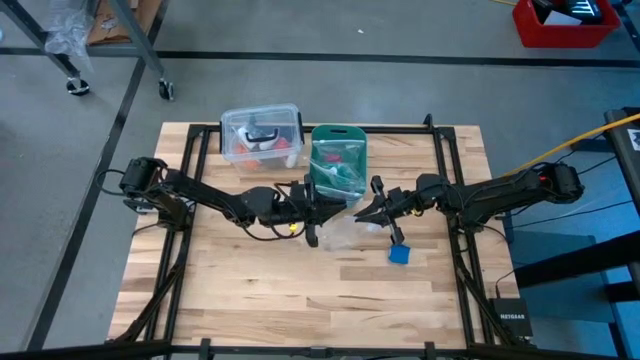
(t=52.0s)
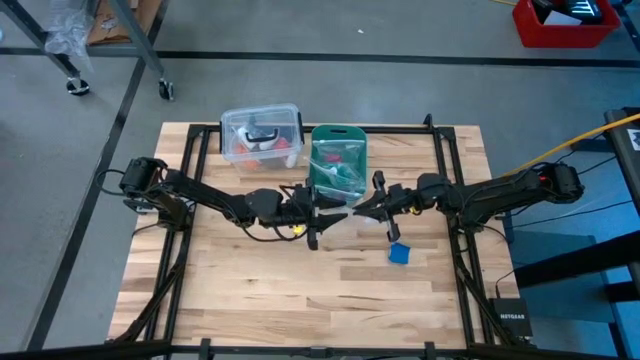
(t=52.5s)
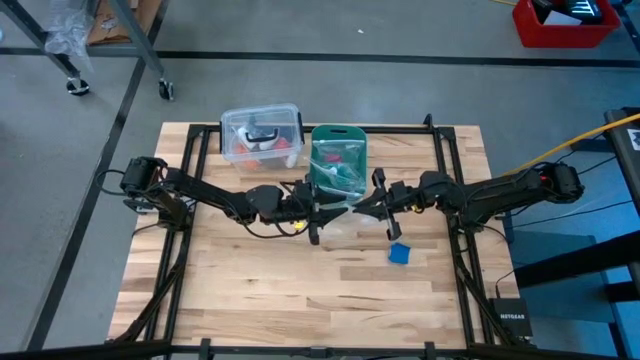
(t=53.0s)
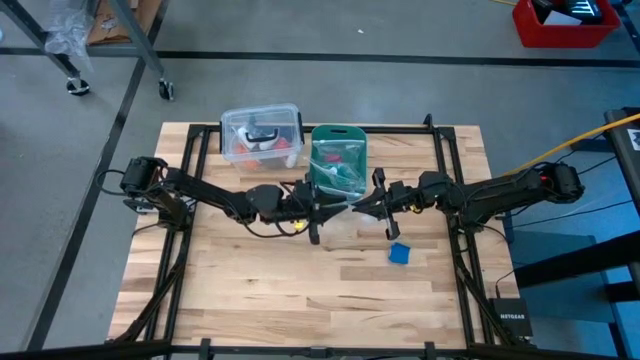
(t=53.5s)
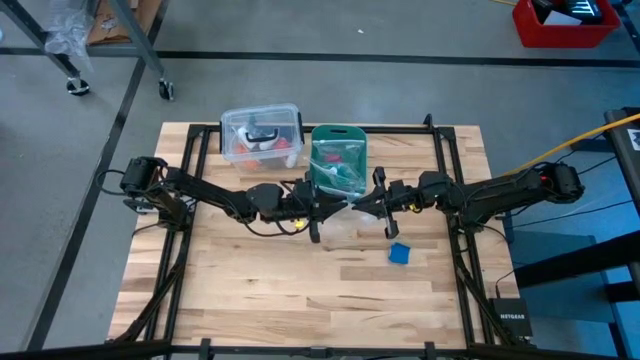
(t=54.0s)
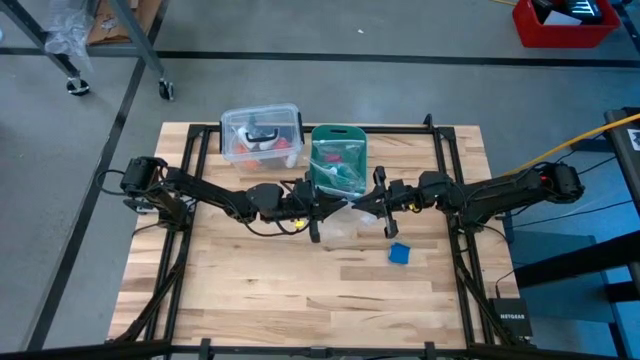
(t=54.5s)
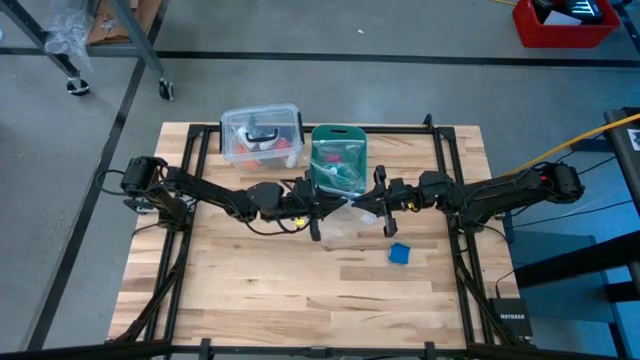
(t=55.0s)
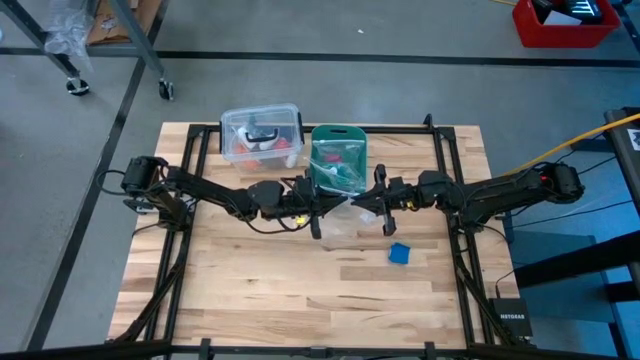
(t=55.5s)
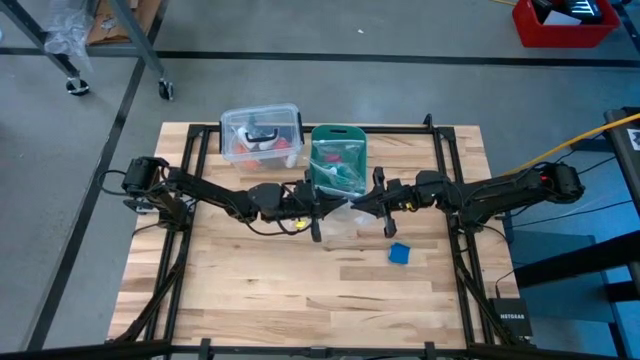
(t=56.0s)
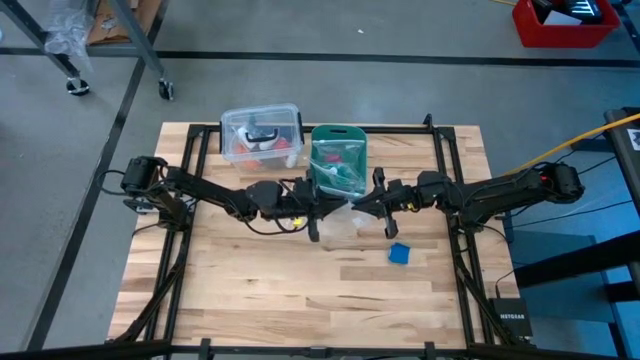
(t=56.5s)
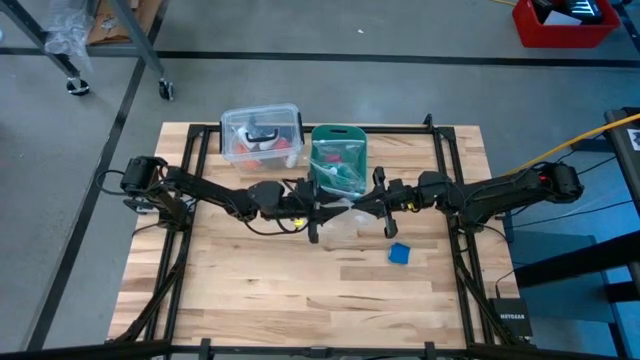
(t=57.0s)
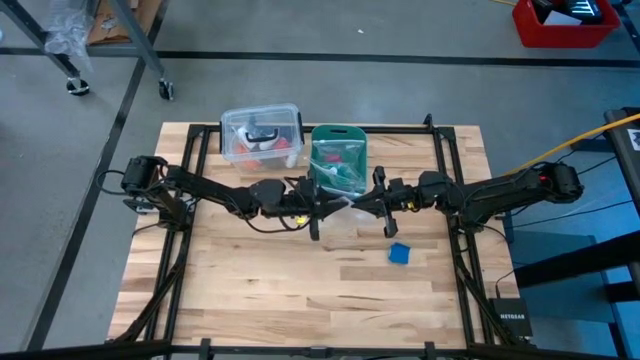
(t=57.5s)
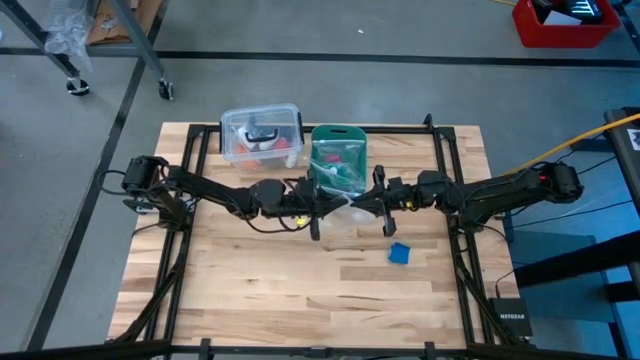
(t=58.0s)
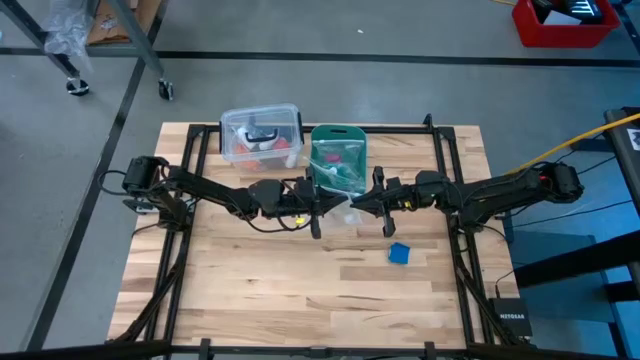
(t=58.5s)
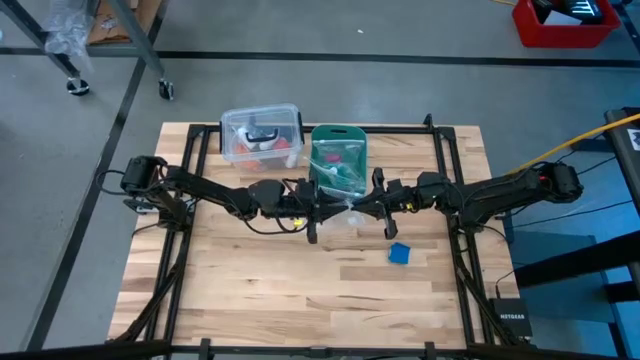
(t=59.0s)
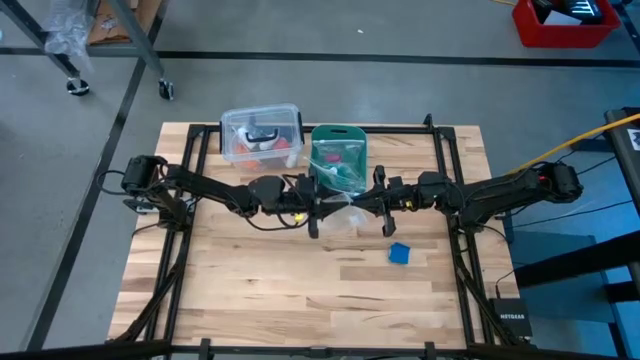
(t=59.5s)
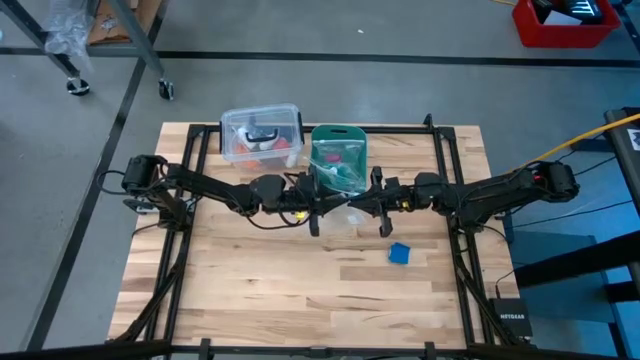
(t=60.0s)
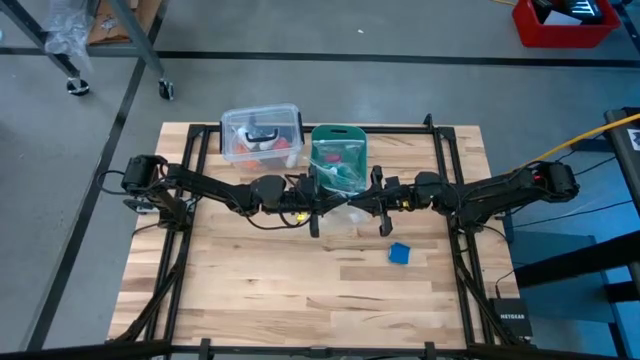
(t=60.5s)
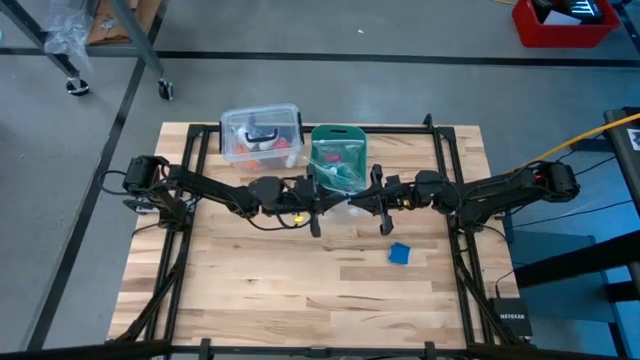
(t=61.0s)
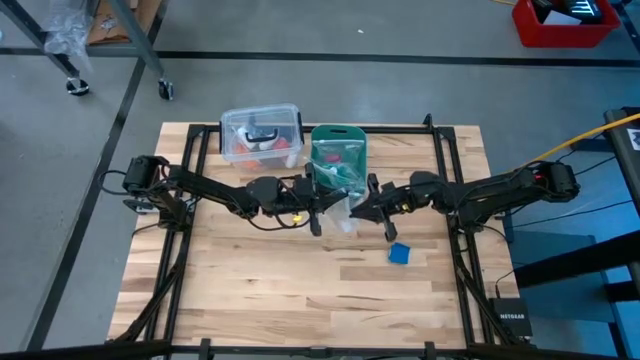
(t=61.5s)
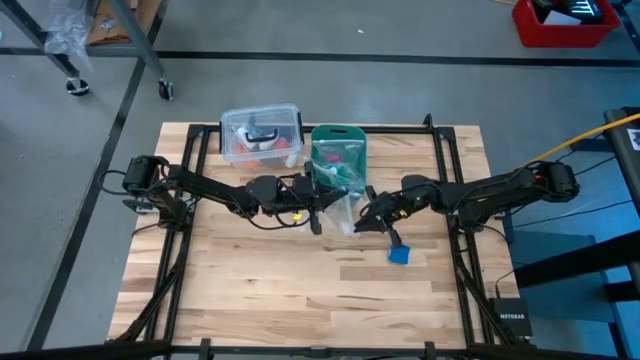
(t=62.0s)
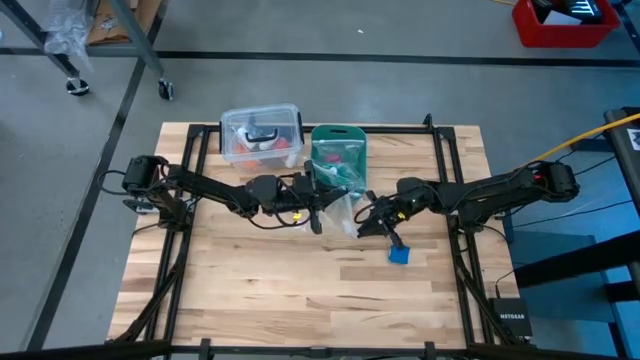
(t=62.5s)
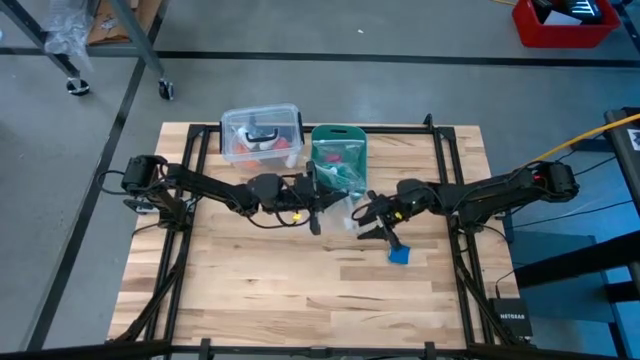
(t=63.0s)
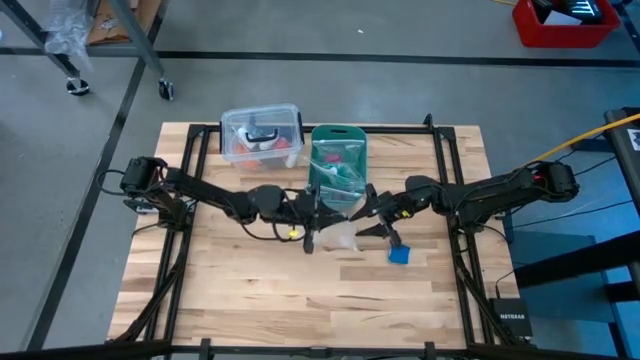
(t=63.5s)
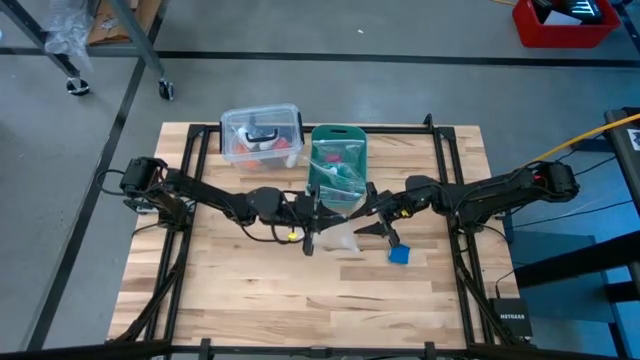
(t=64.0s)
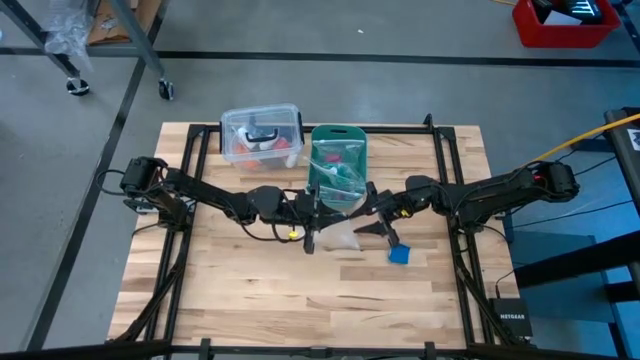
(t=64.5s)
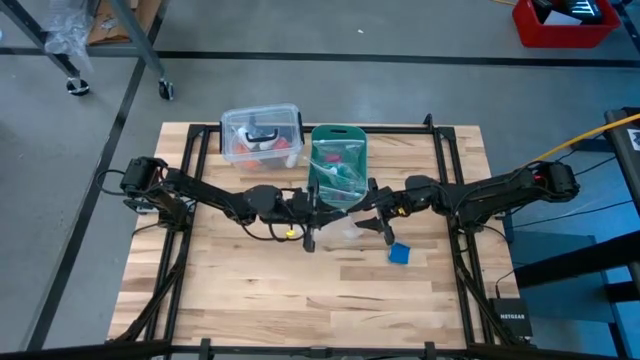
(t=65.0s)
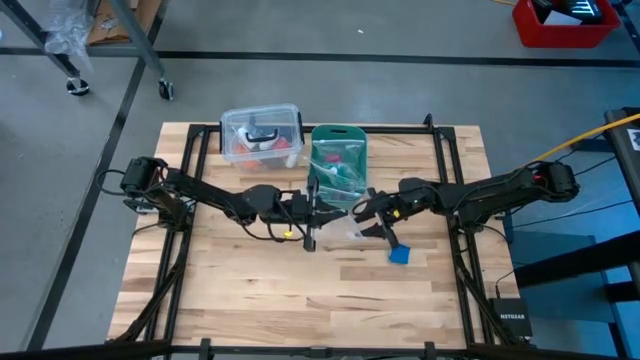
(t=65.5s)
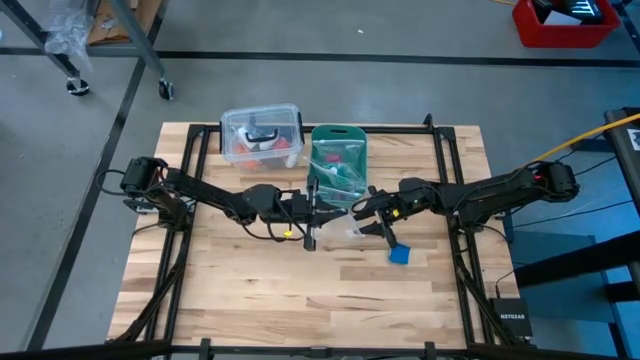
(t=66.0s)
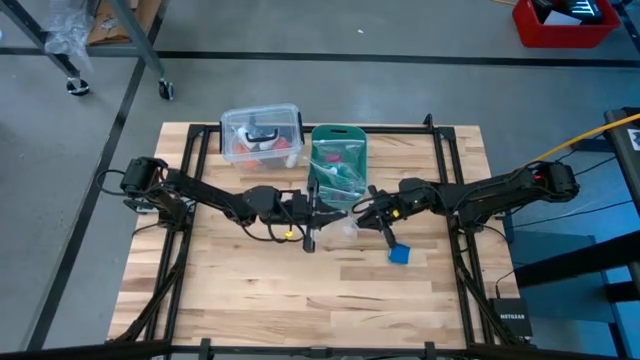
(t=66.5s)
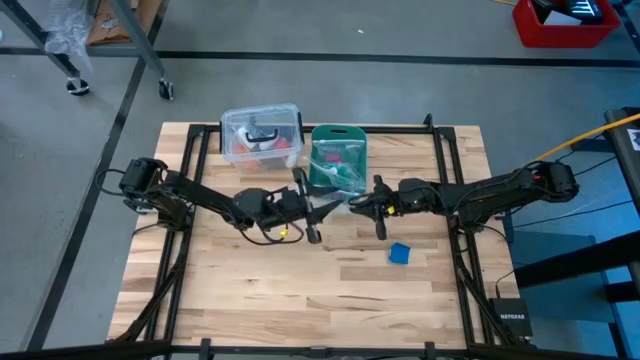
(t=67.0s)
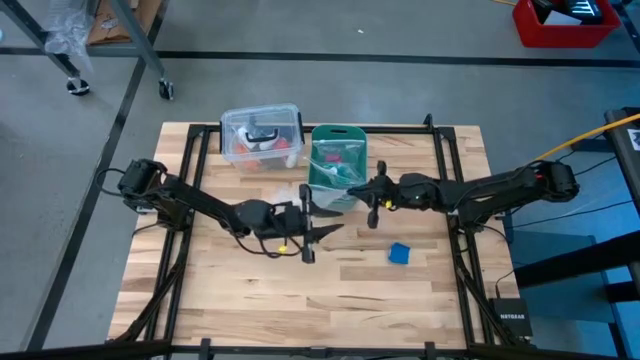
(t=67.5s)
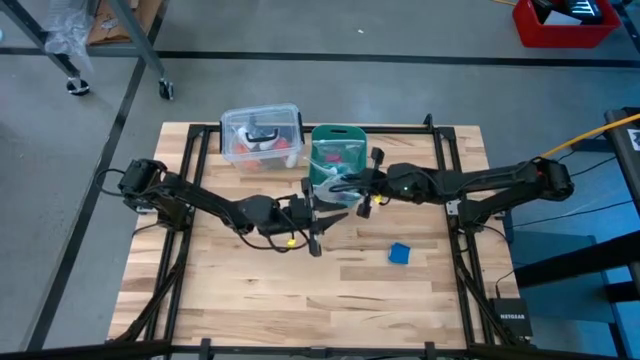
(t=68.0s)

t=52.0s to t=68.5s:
Task: Roll bandage
Open the transparent zip bag

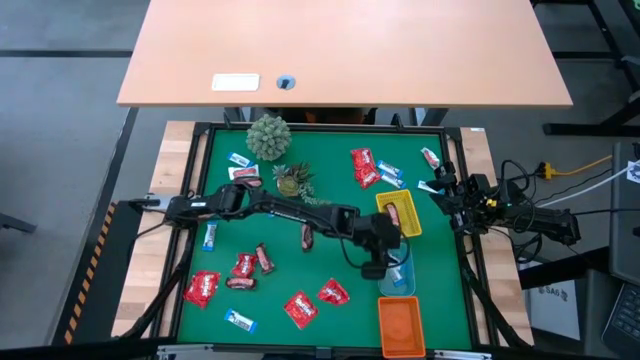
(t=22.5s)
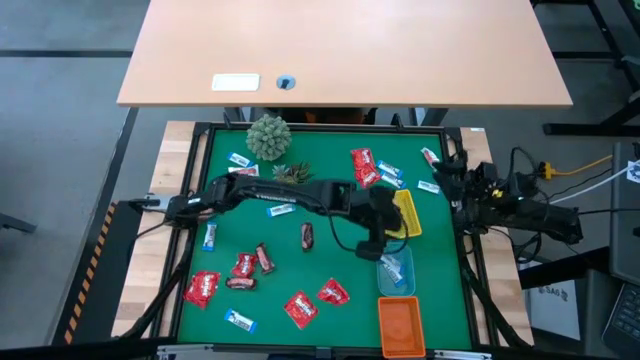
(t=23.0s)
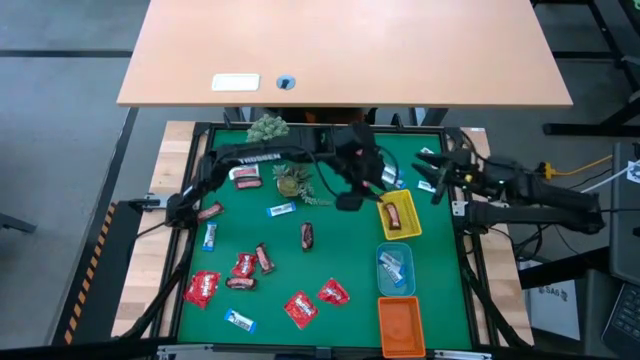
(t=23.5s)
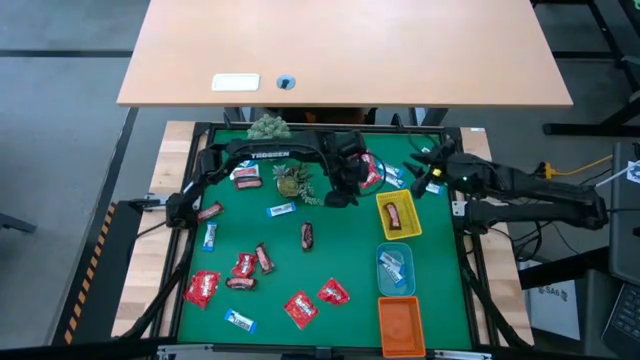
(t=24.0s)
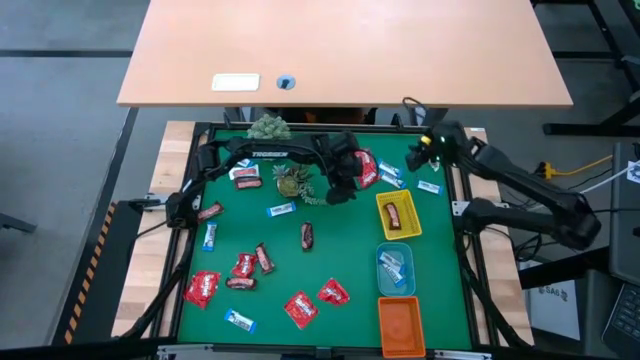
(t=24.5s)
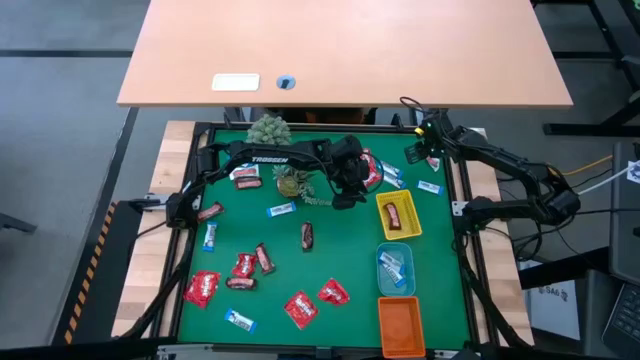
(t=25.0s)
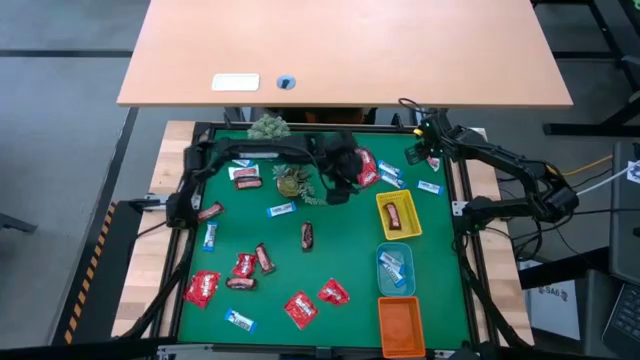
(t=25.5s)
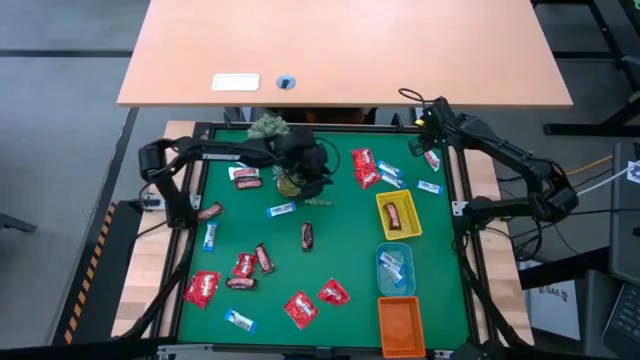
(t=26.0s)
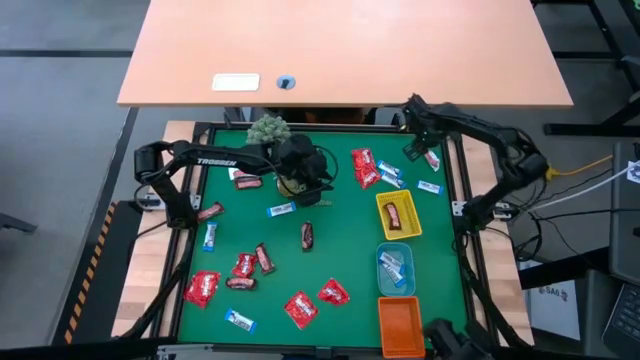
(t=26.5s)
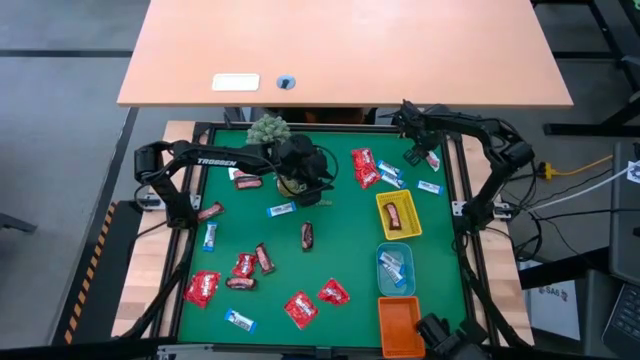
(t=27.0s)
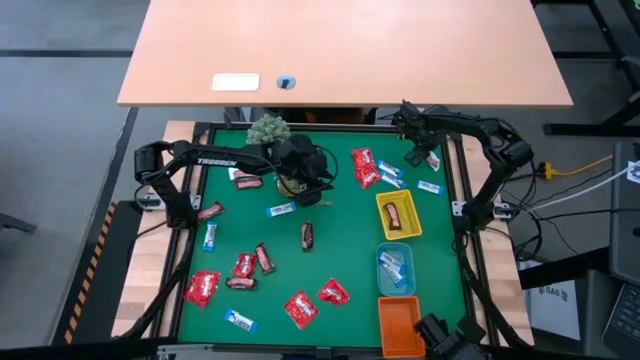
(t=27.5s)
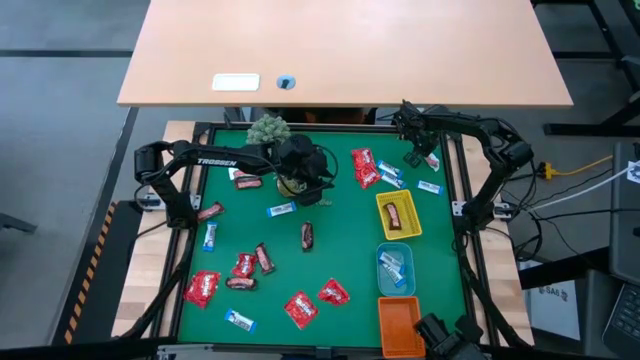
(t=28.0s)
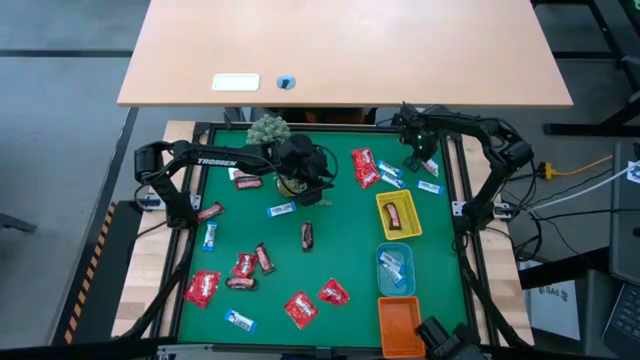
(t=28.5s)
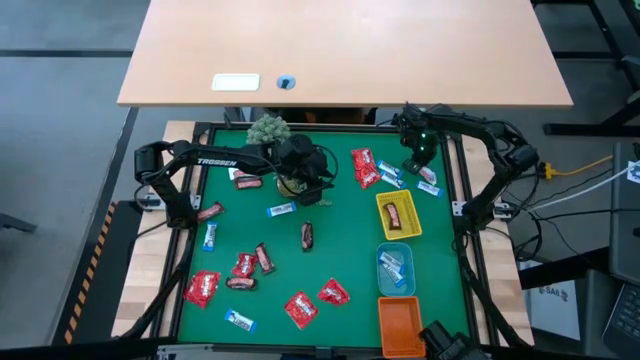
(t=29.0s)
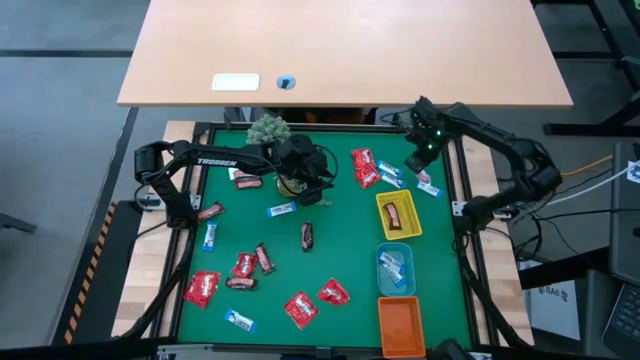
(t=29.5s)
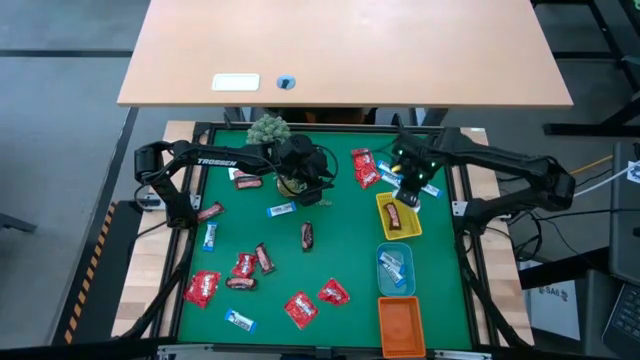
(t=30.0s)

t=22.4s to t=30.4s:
Task: Sort candy
Put the white candy into the yellow bin
